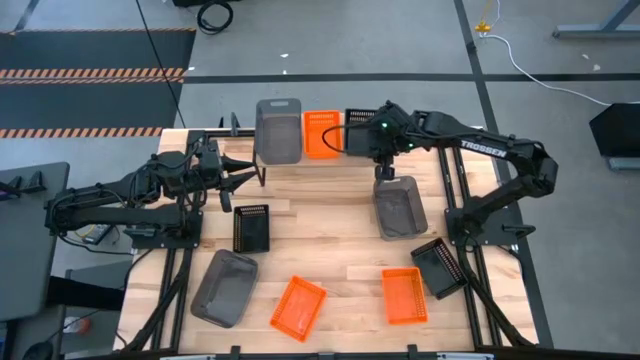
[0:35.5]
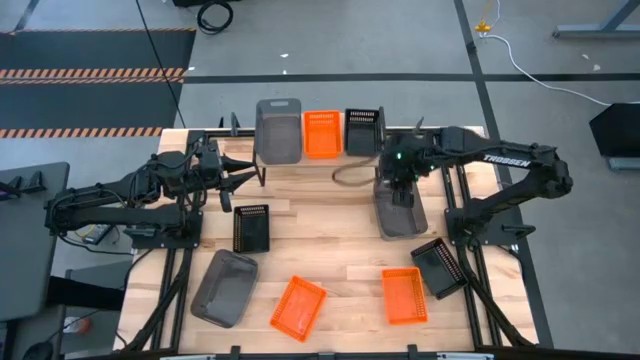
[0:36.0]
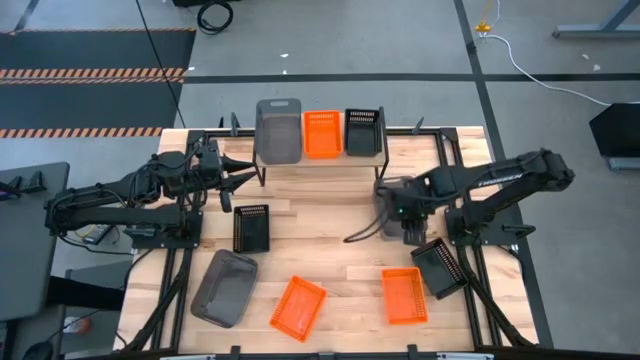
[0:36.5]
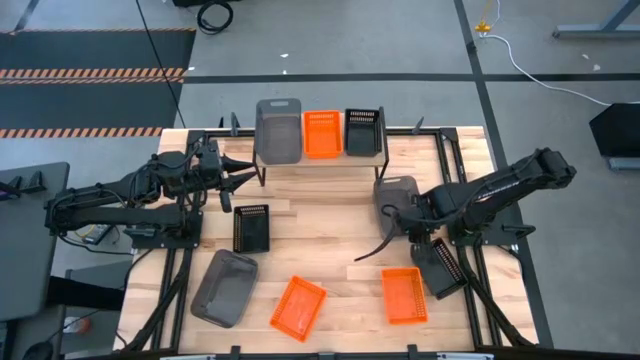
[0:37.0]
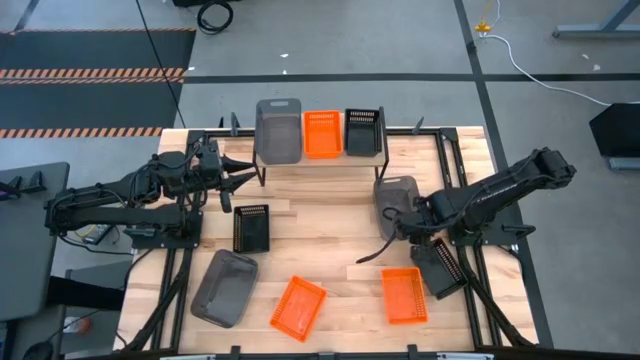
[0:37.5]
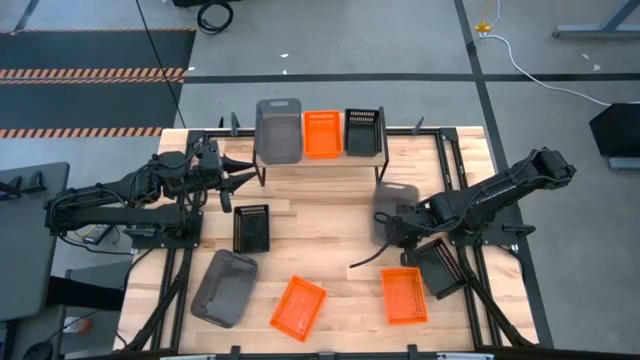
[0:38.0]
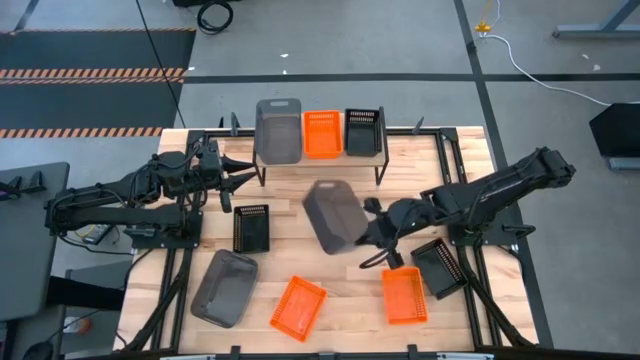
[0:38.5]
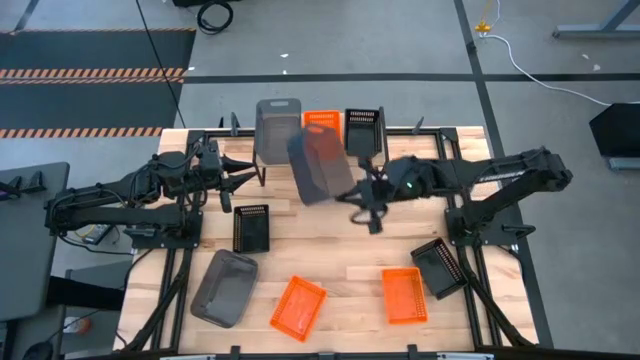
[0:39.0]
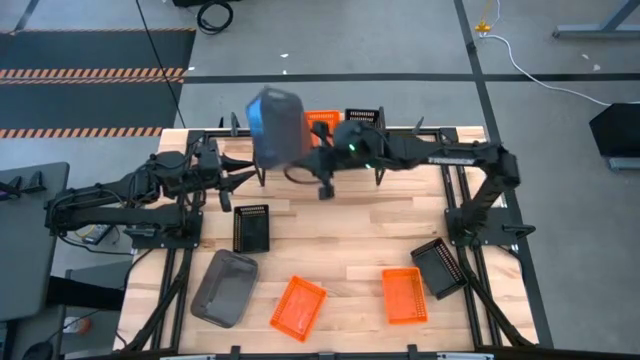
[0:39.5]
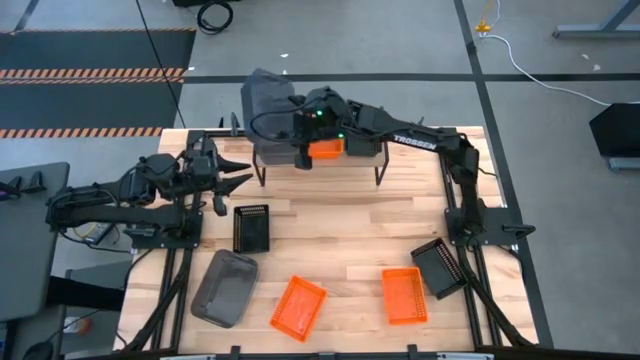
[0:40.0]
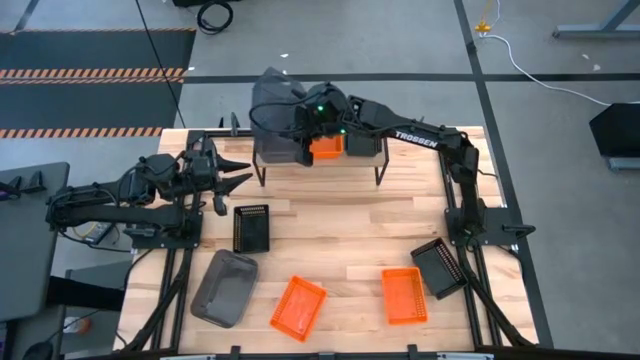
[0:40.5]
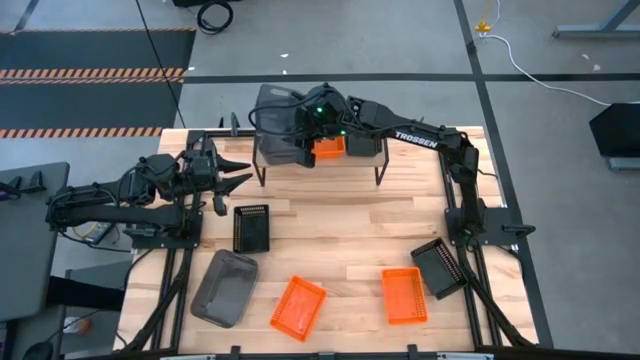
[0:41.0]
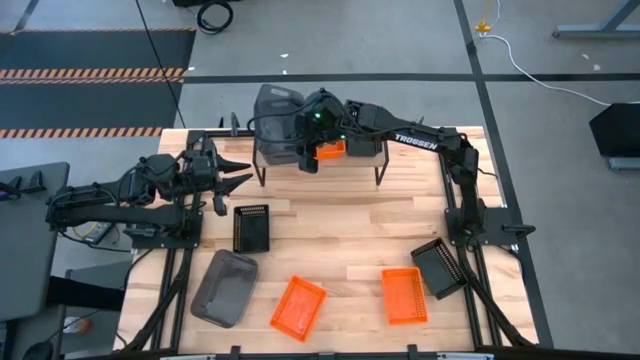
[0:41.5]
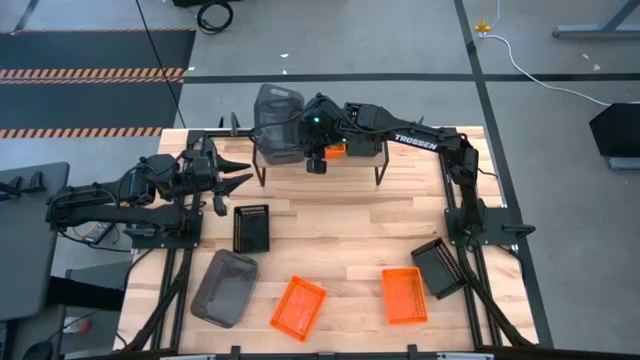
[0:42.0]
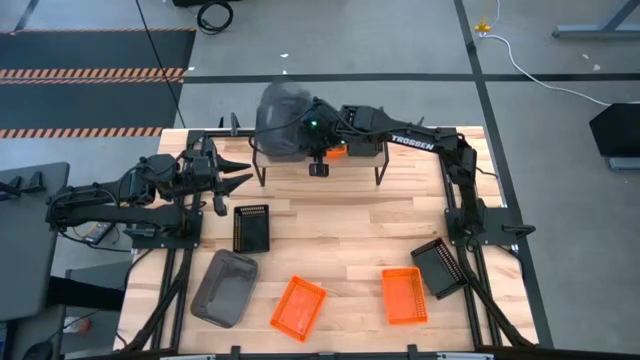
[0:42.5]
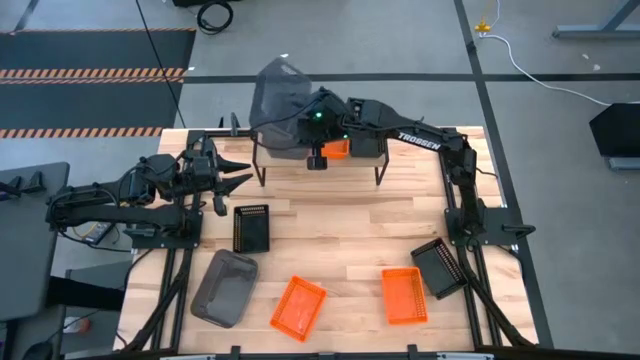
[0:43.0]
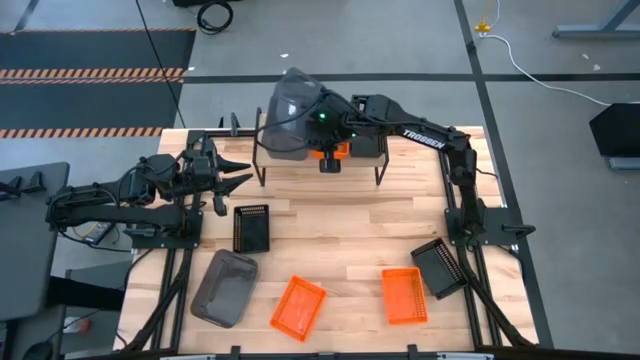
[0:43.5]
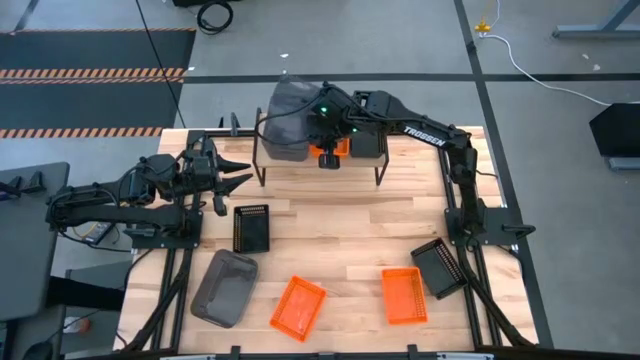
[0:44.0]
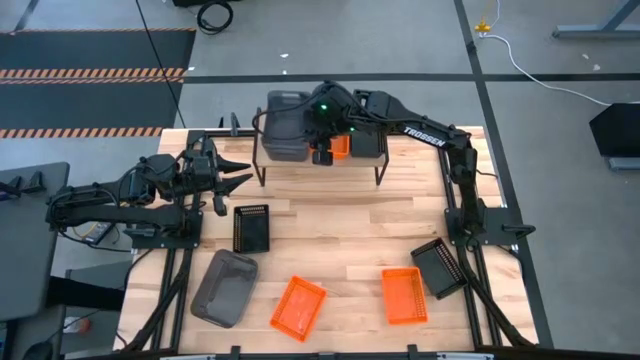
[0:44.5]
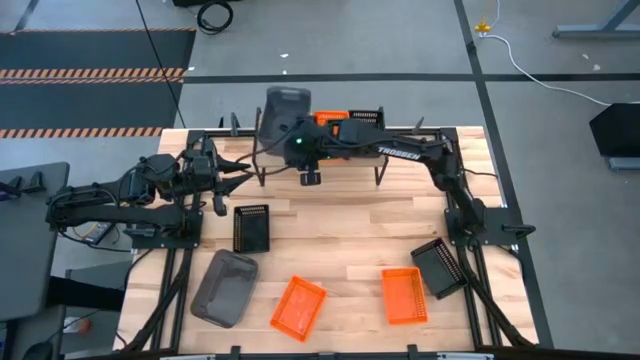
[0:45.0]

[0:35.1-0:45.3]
Task: Stack baskets on shelf by color
Stack the top black bin on top of the black bin on the shelf

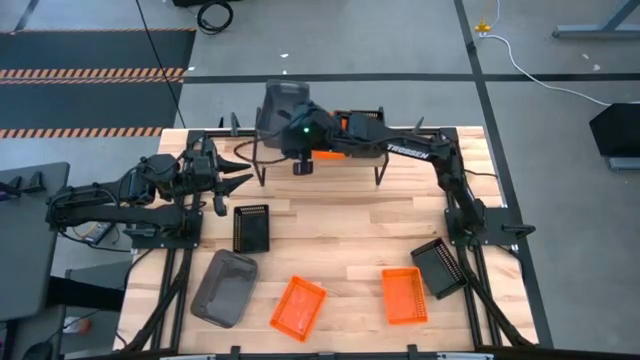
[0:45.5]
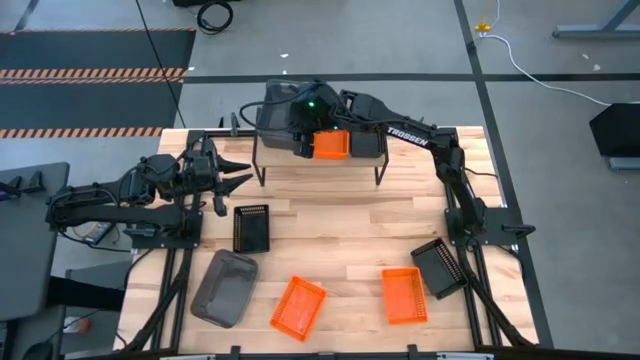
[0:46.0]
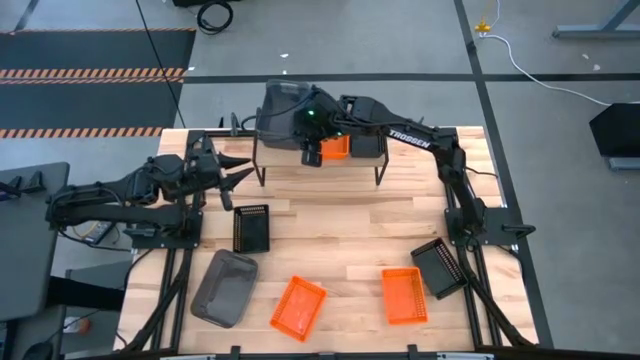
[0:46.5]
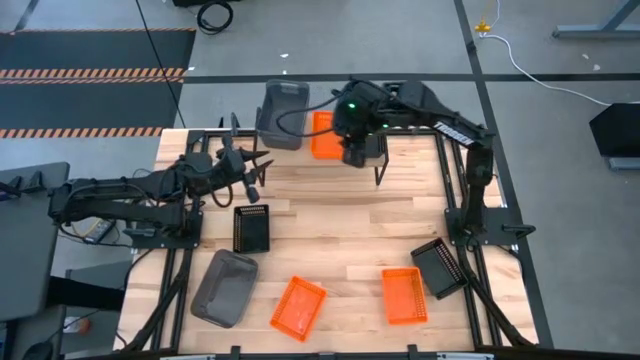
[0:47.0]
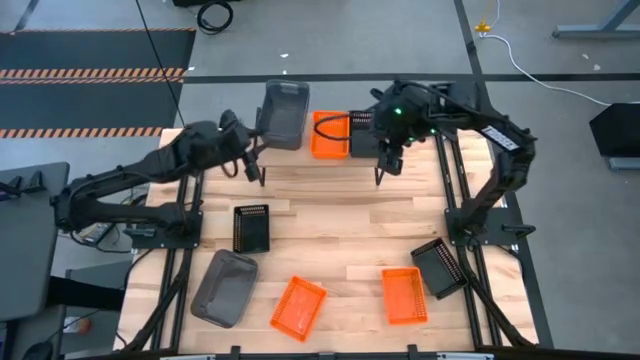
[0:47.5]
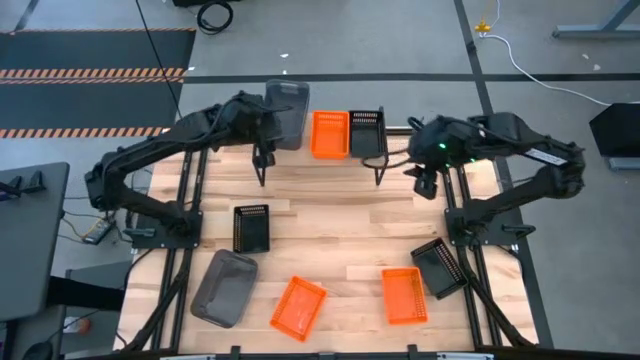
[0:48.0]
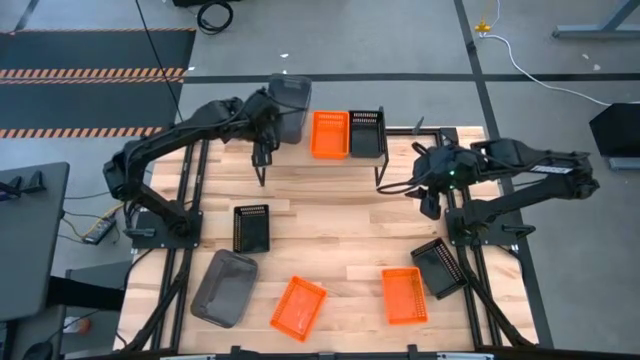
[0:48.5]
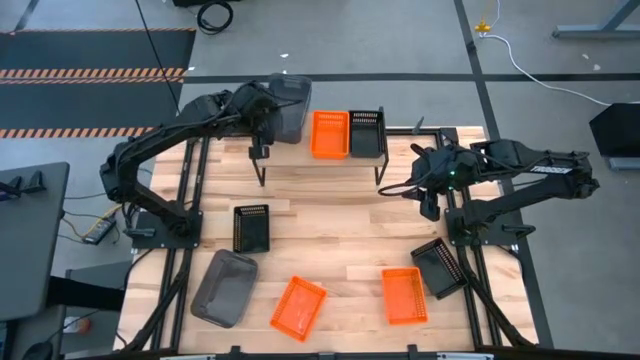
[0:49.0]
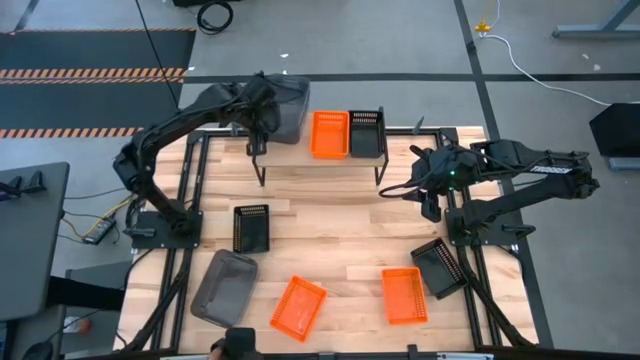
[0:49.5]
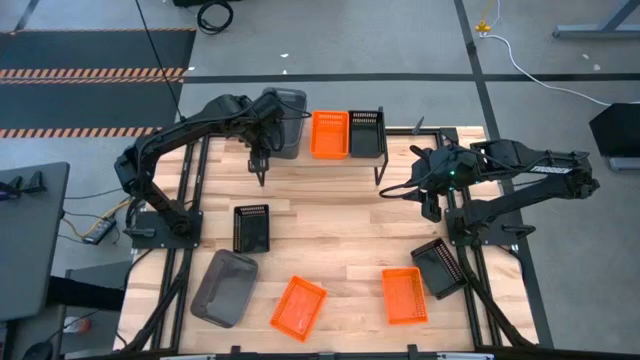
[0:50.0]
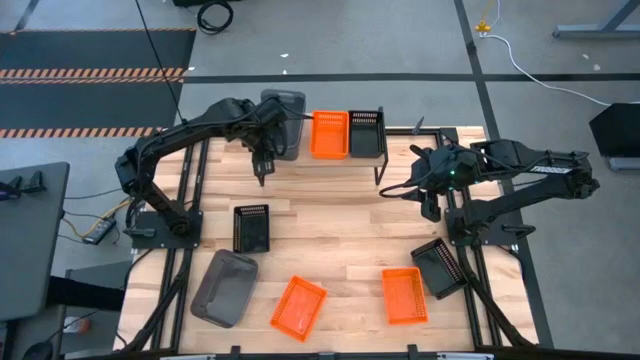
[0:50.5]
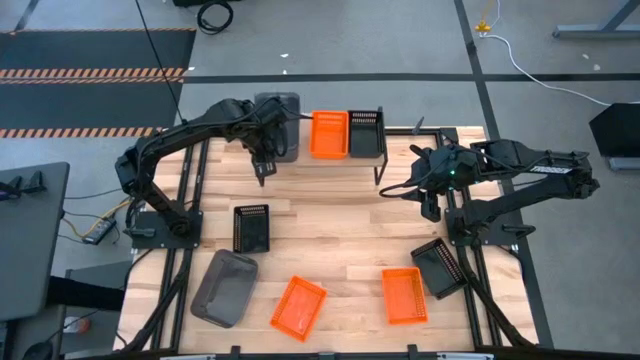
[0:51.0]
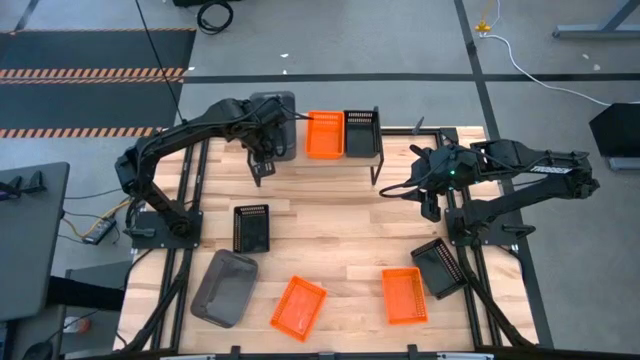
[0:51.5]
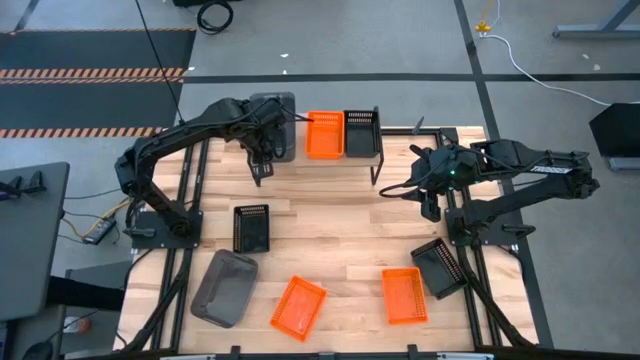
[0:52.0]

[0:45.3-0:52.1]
Adjust the black bins on the shelf
